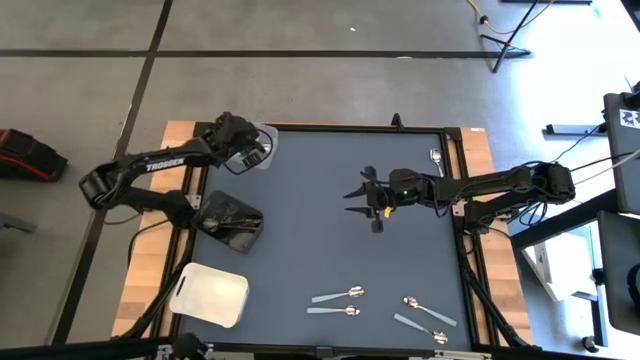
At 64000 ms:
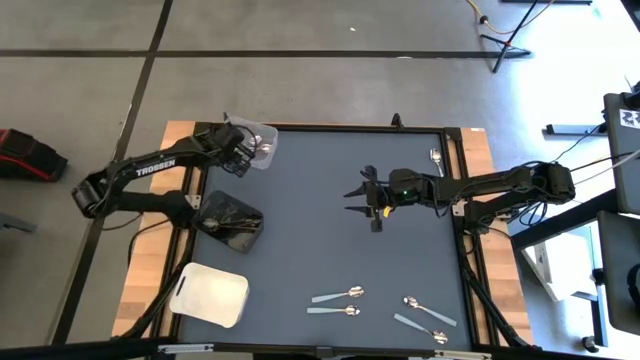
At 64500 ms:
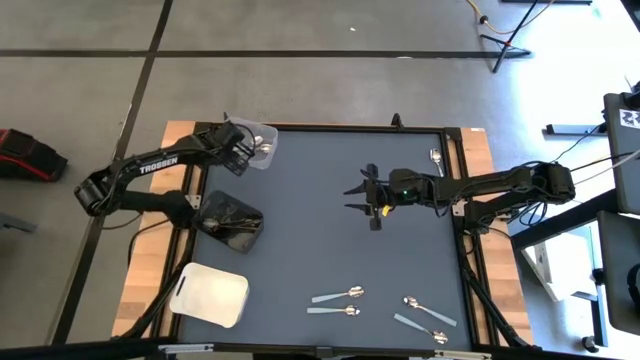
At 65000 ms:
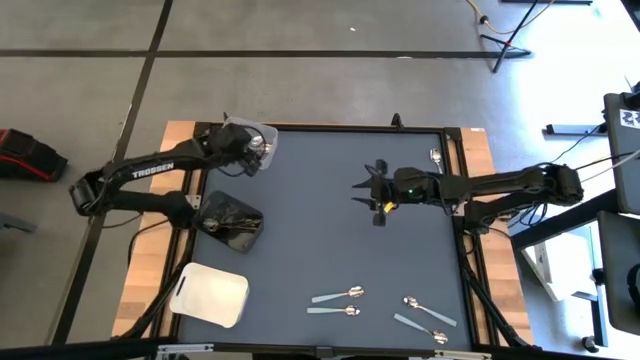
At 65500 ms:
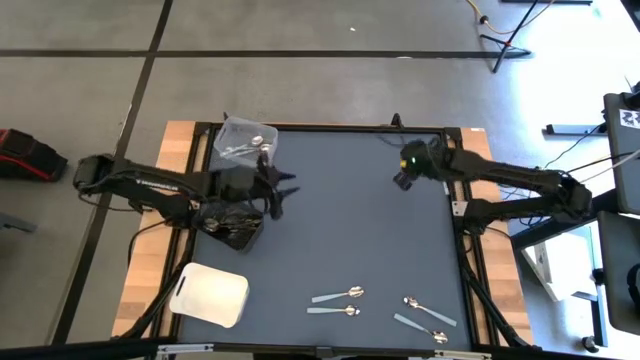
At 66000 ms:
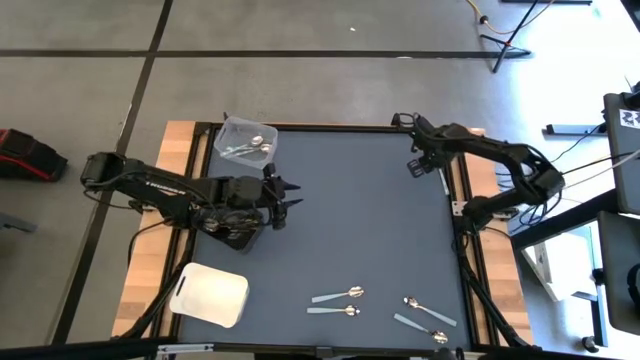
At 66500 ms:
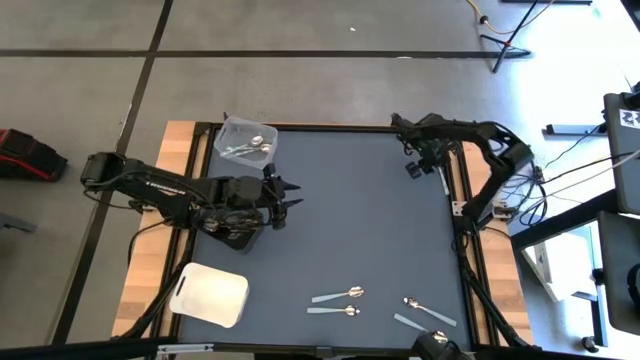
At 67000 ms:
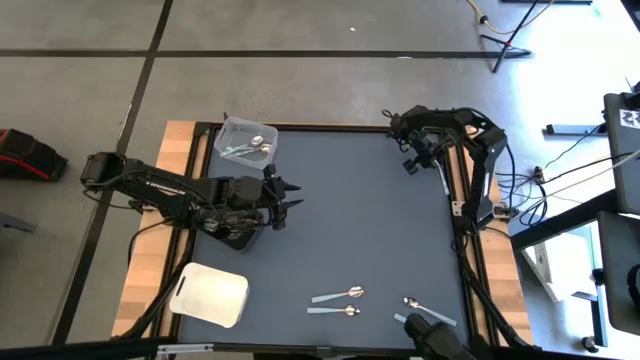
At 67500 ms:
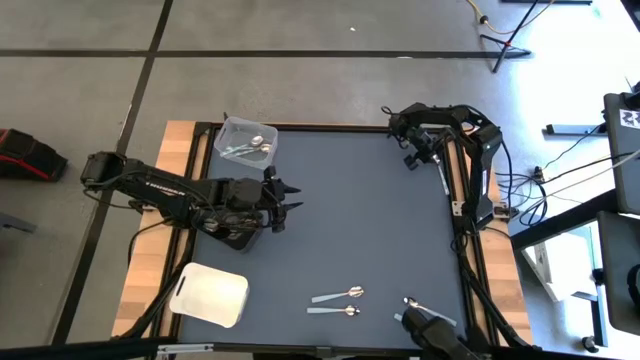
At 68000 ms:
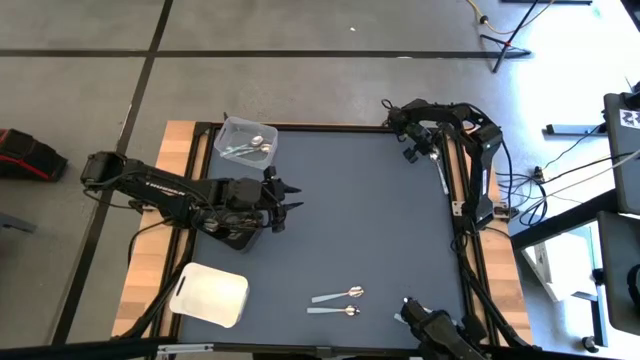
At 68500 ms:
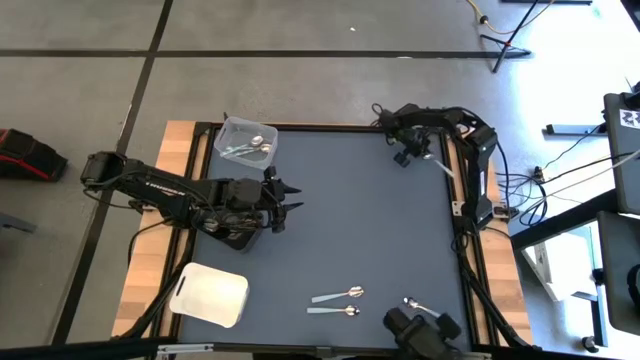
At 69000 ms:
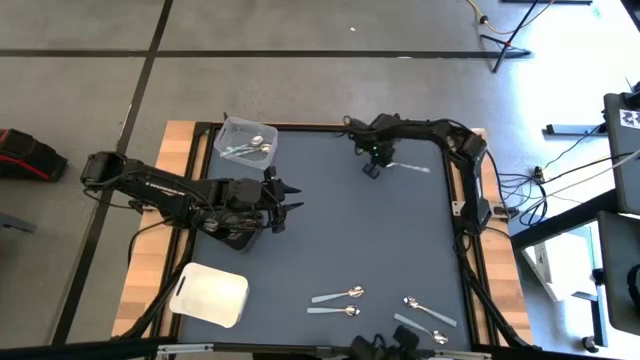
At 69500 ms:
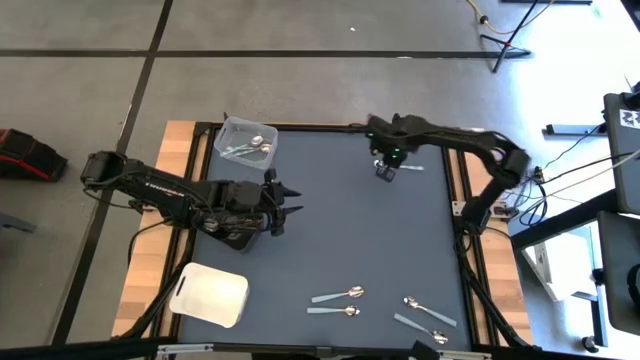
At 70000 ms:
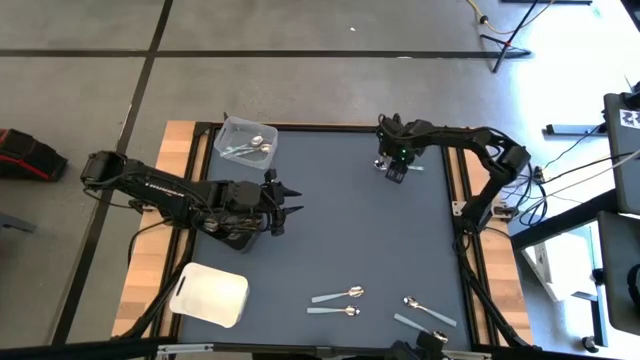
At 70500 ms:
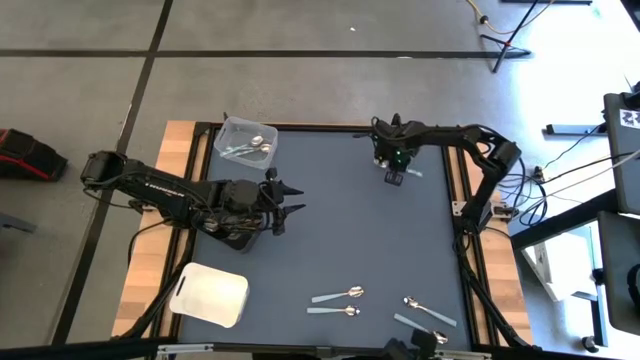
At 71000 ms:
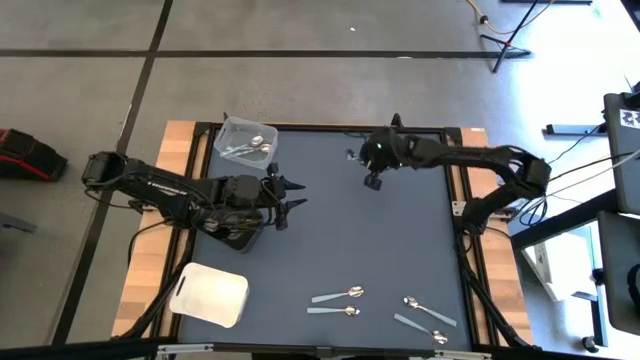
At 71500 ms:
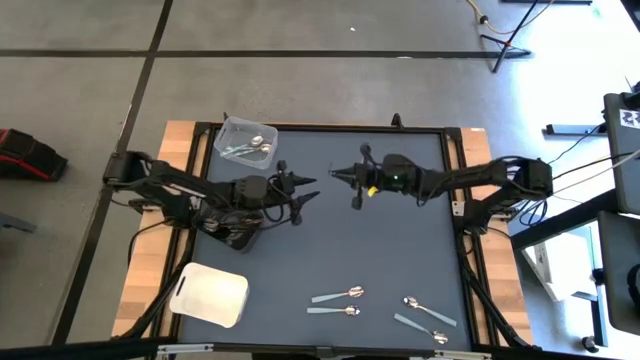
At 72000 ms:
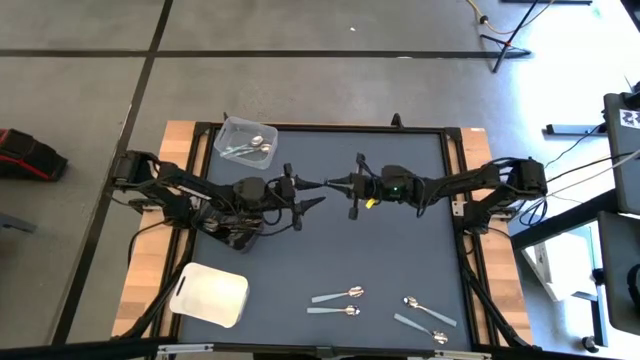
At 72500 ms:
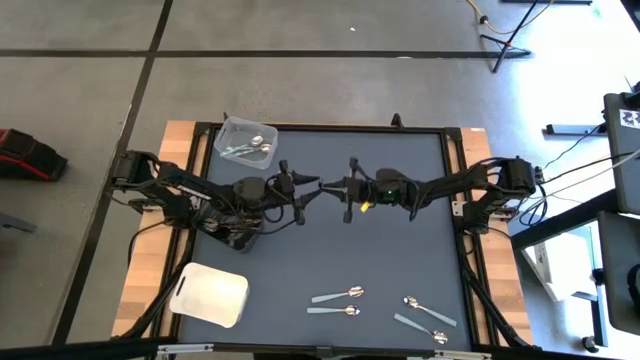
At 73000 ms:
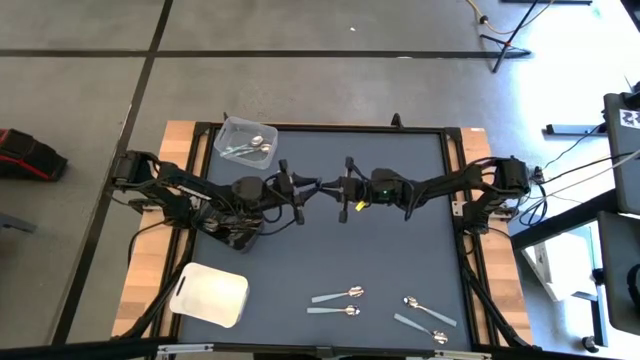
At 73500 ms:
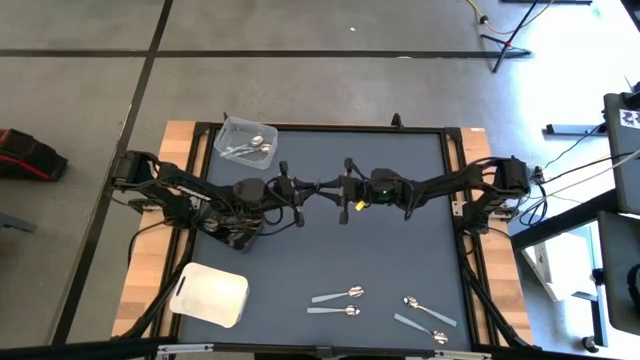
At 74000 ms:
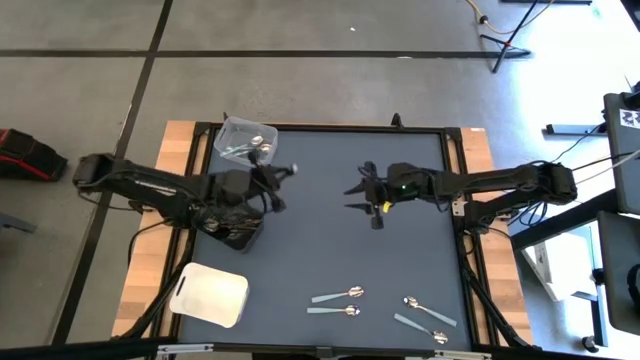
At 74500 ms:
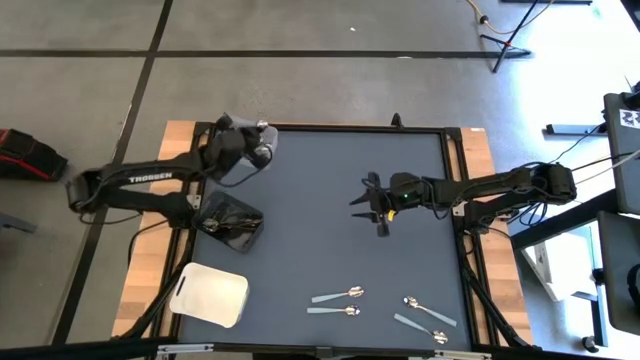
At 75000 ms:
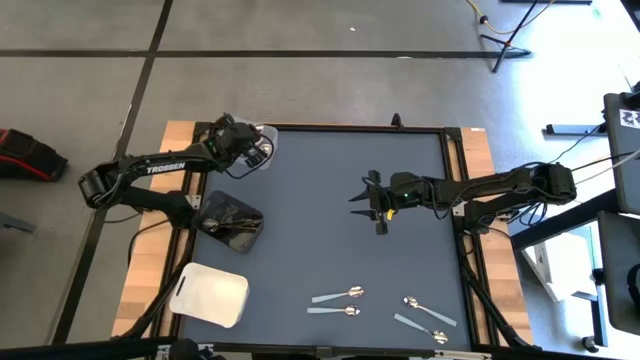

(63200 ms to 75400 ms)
Task: Sort silverware by color (type)
Put the green spoon into the transparent bin

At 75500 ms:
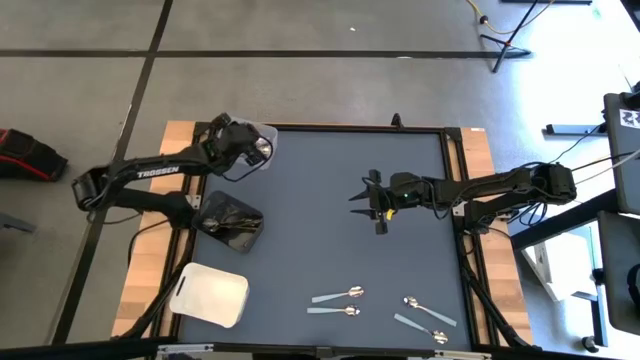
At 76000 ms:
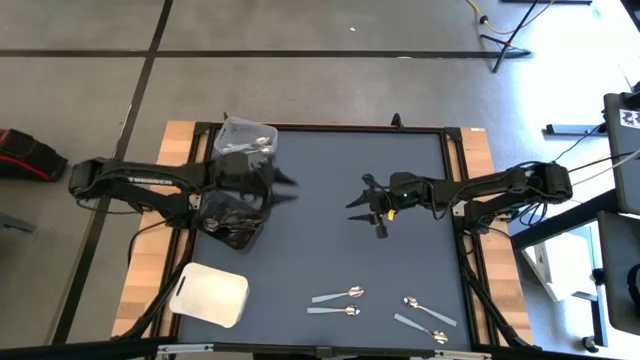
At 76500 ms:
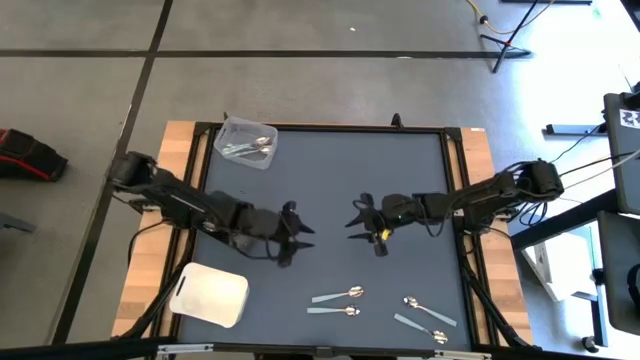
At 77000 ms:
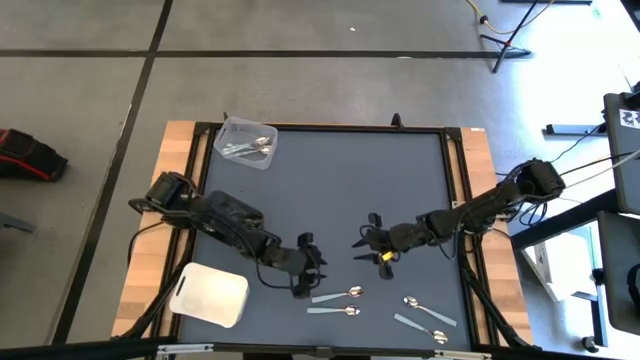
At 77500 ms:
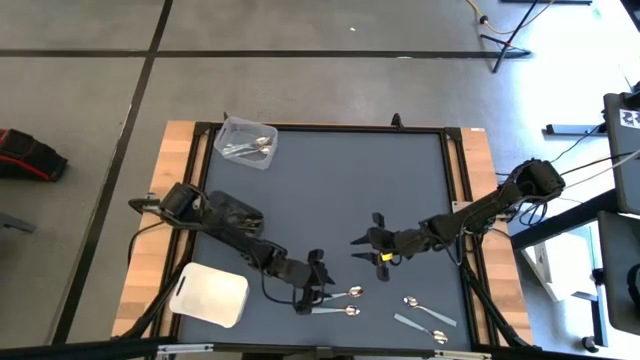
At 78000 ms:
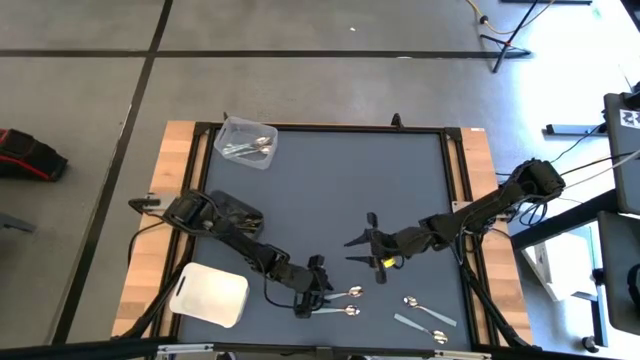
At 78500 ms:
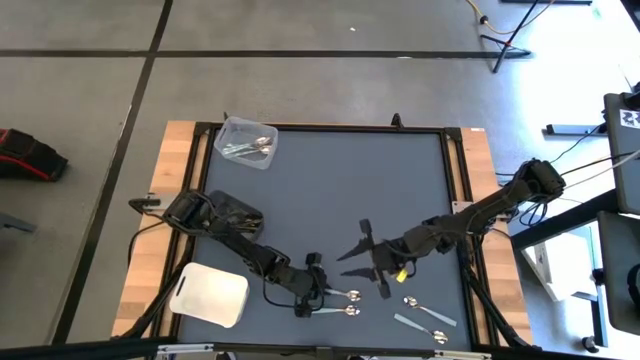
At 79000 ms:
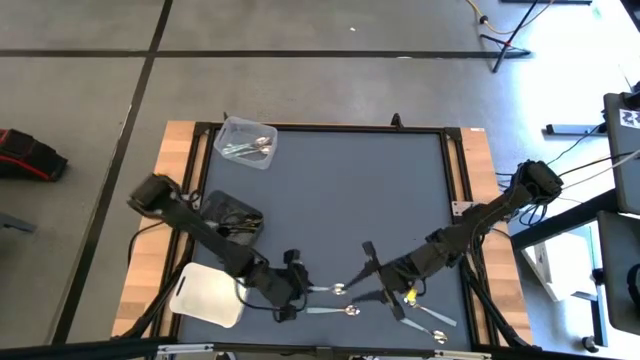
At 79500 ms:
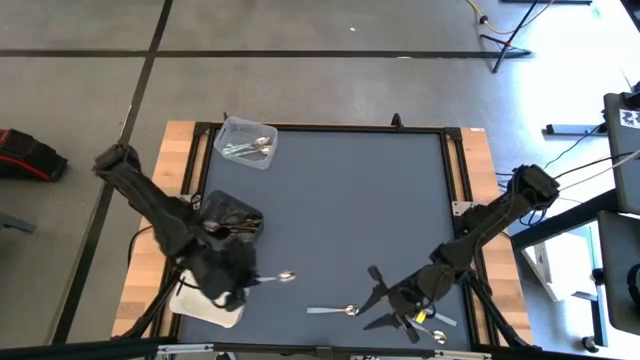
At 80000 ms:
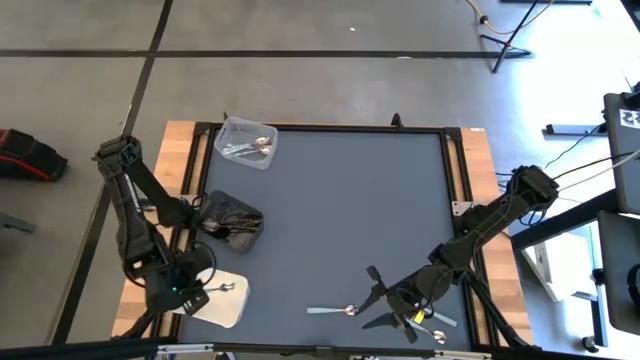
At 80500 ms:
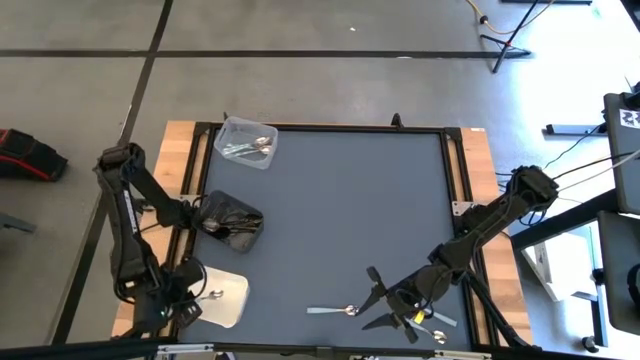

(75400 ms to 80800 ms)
Put the blue spoon into the white bin

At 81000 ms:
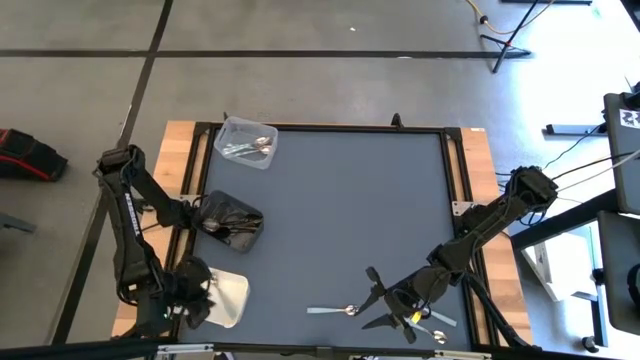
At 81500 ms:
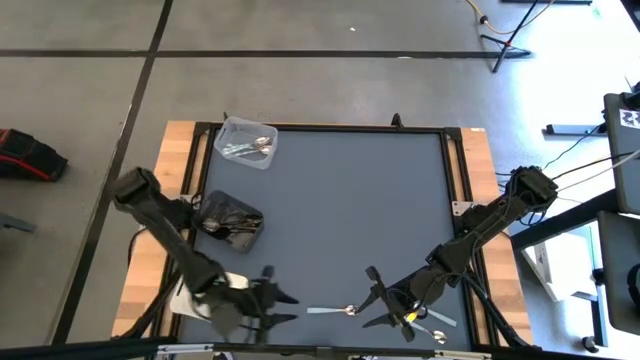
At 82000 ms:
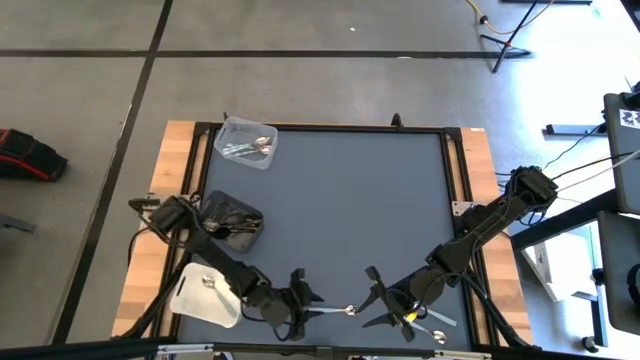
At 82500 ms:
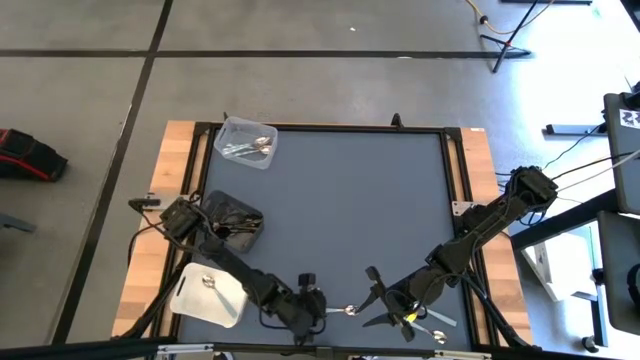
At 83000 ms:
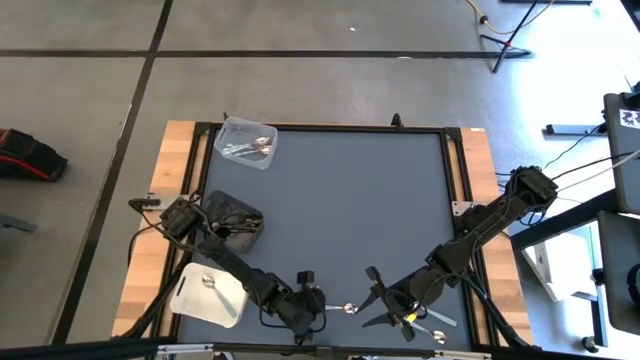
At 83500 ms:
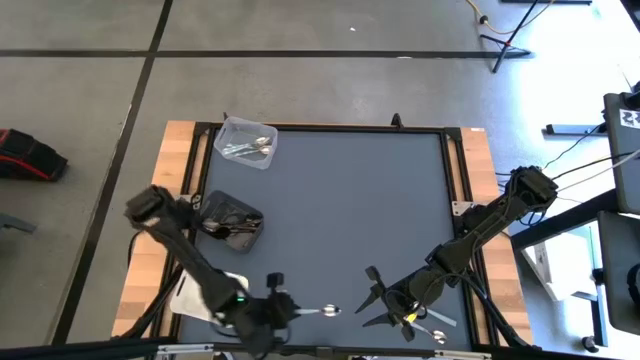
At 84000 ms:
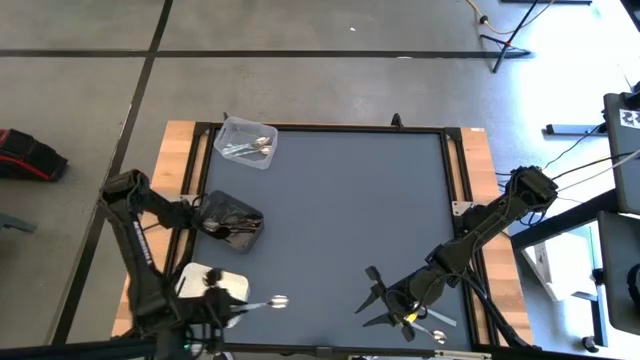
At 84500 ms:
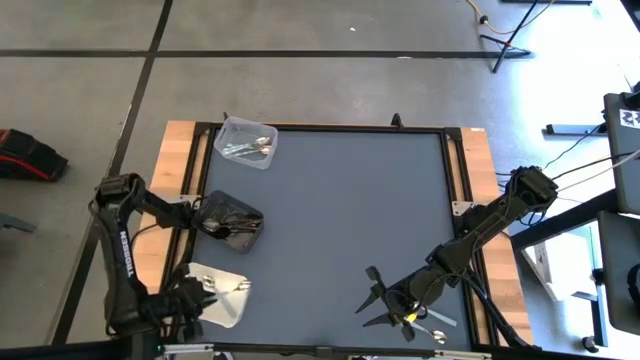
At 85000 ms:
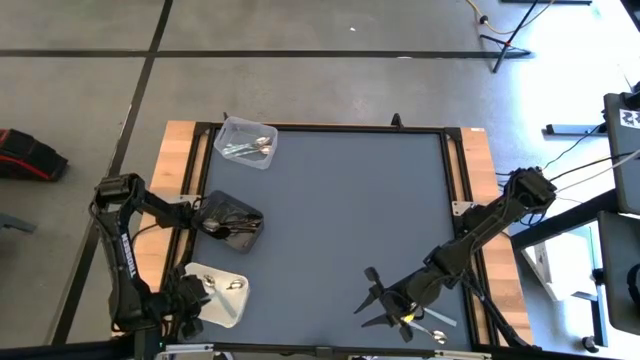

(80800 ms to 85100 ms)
Put the blue spoon into the white bin
